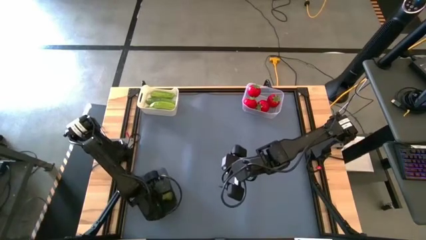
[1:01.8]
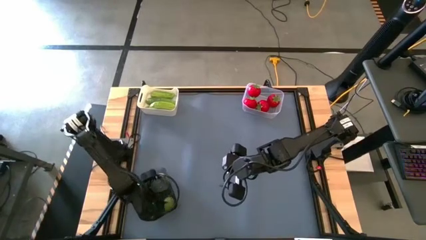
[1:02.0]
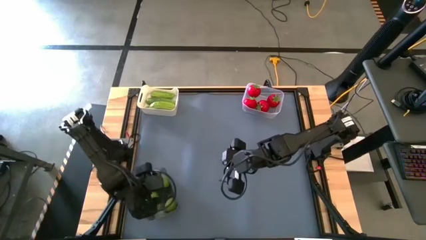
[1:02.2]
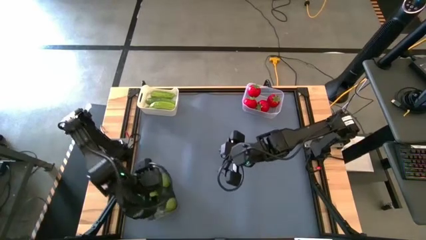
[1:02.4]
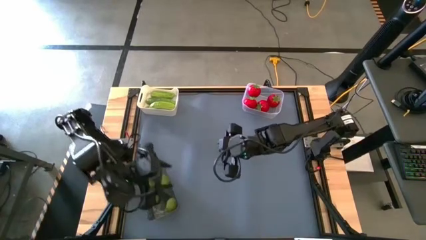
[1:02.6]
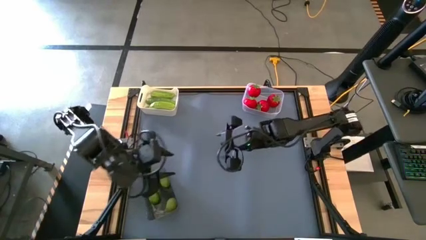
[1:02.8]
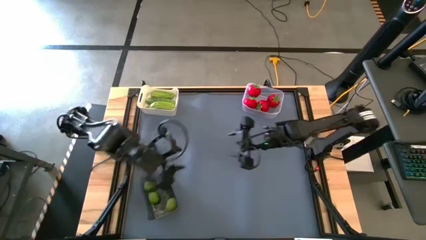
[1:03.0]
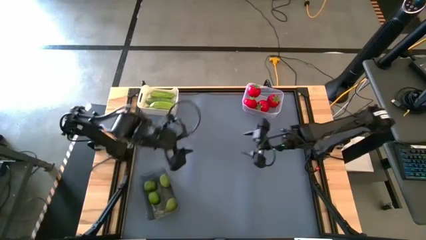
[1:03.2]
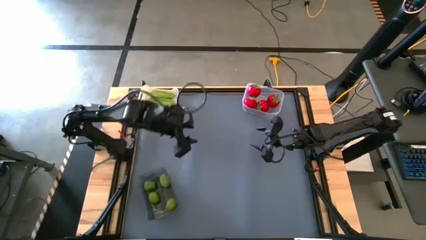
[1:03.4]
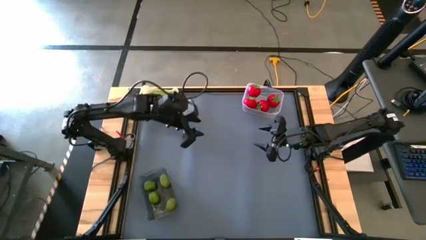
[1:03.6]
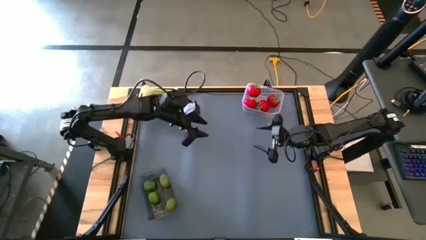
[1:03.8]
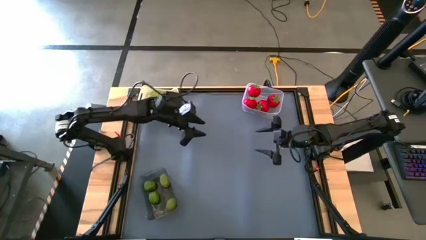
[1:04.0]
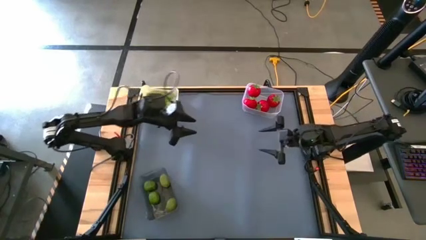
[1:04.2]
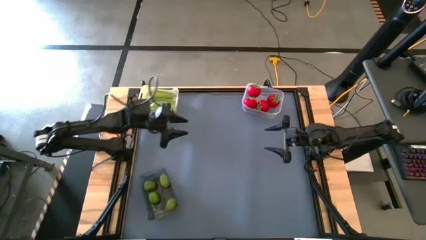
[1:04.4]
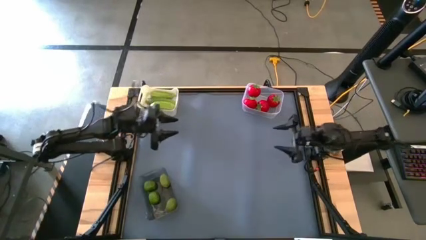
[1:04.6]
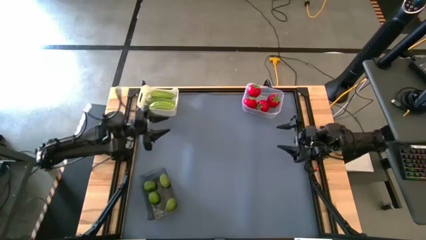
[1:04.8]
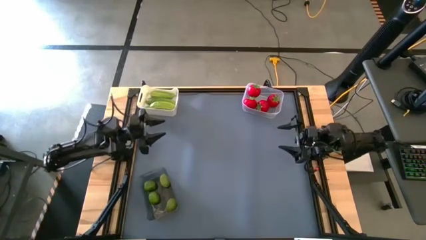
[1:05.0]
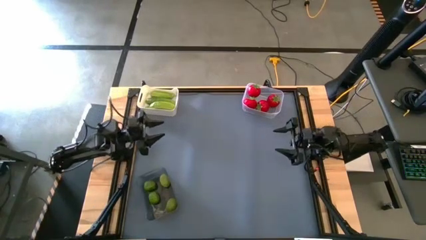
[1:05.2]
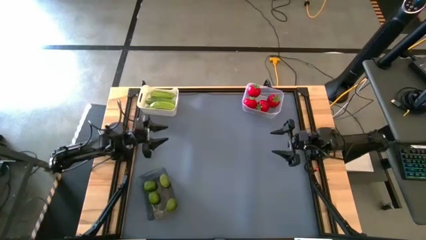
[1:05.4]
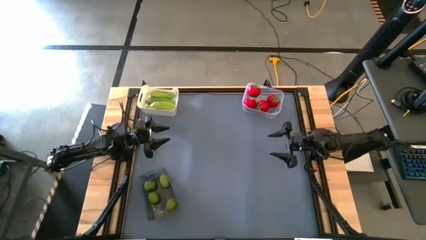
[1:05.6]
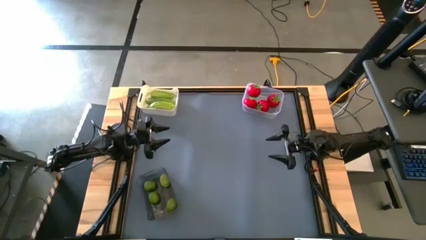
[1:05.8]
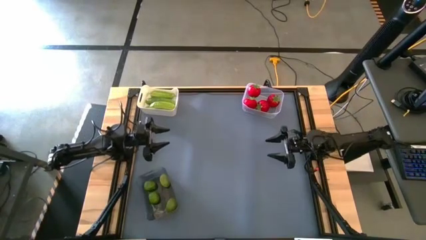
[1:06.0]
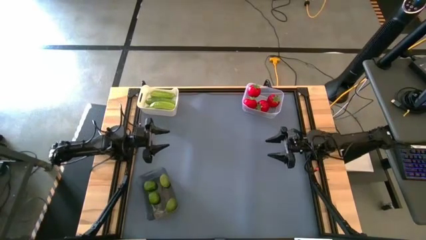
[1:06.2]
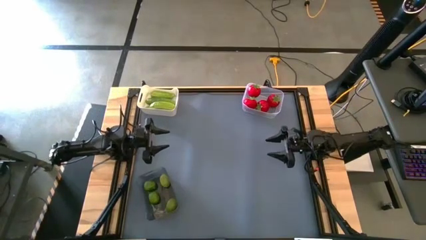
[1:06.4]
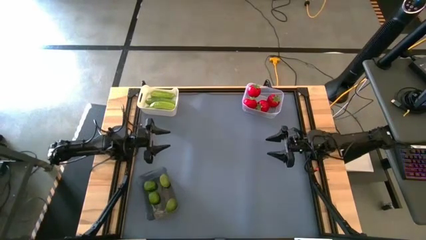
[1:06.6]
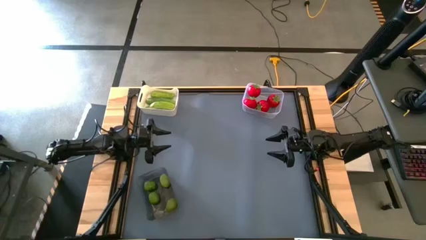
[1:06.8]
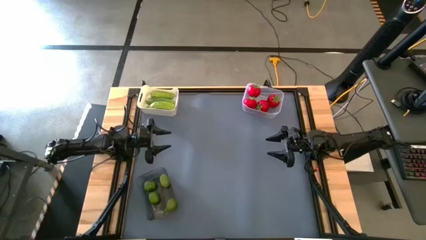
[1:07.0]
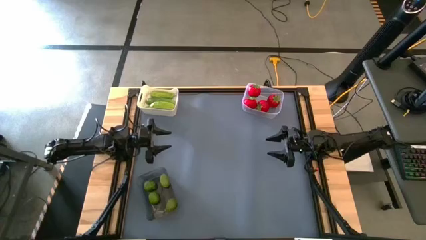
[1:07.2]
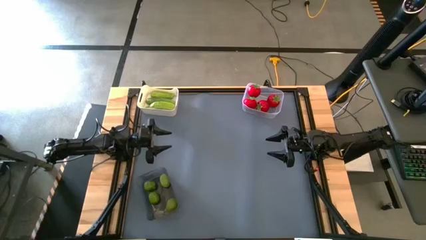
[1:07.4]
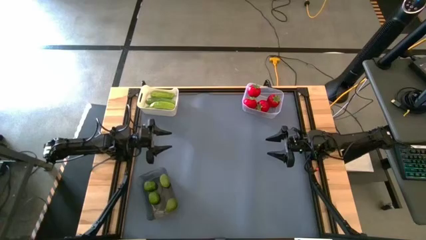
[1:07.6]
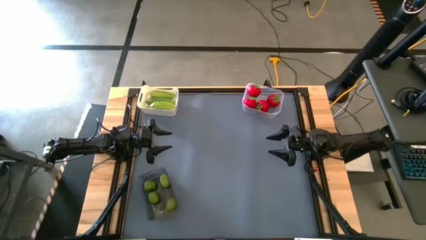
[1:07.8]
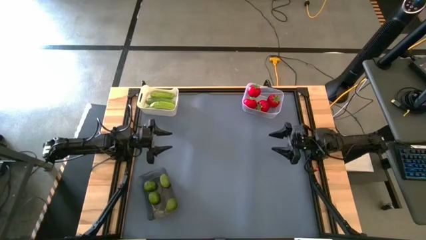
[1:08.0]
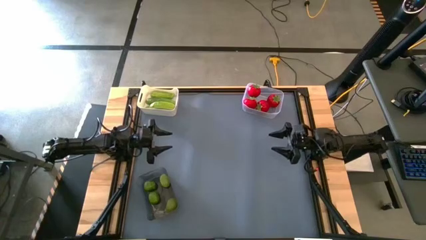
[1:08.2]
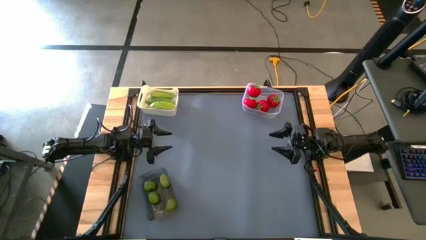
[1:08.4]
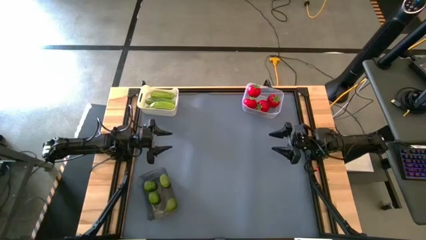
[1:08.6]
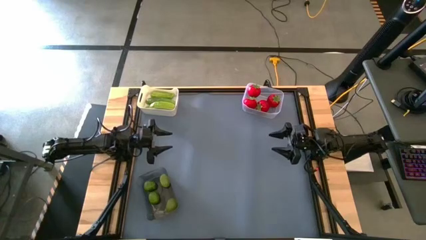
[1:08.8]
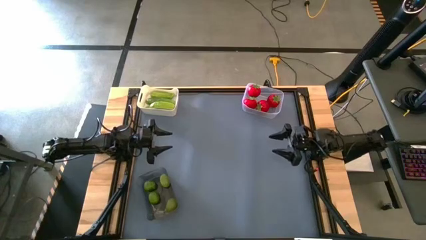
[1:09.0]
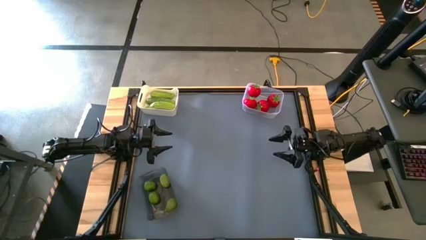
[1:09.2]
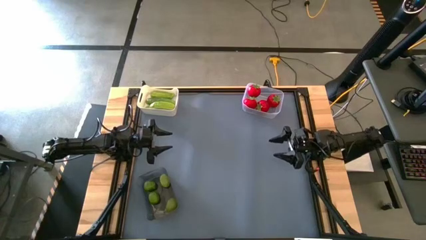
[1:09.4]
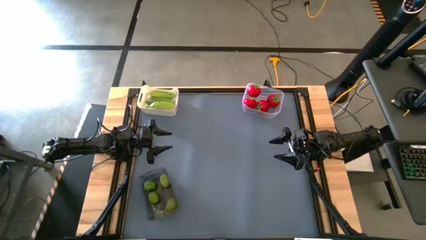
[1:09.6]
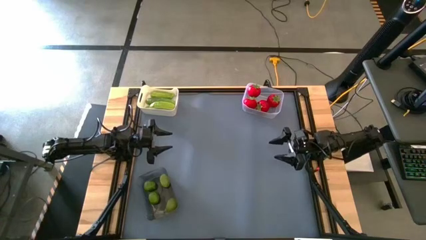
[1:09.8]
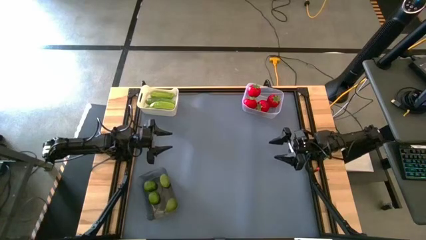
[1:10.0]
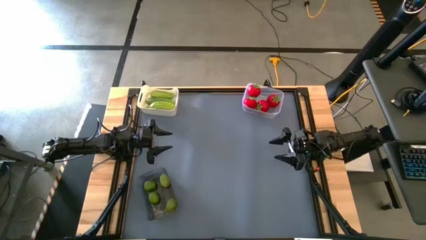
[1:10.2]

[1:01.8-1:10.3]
Task: Sort produce into baskets
Return to Home Position

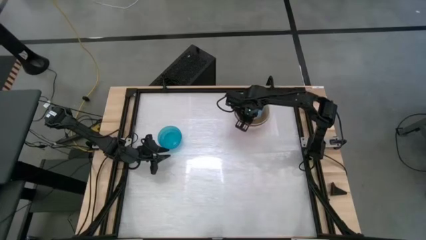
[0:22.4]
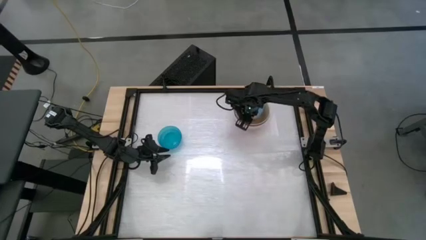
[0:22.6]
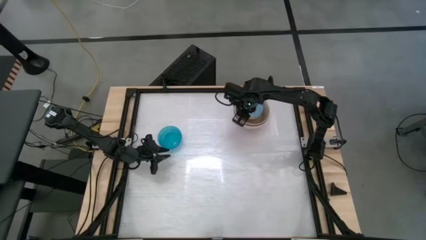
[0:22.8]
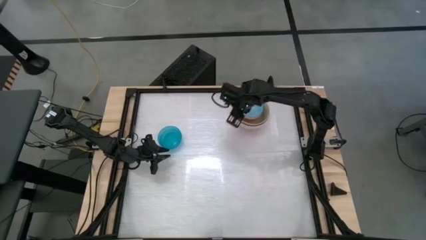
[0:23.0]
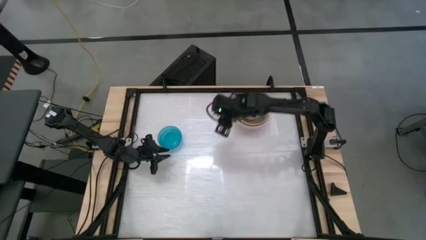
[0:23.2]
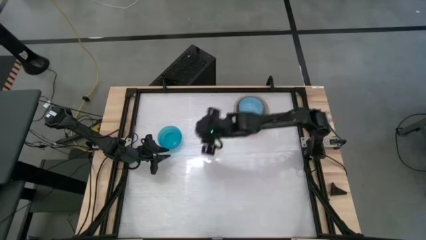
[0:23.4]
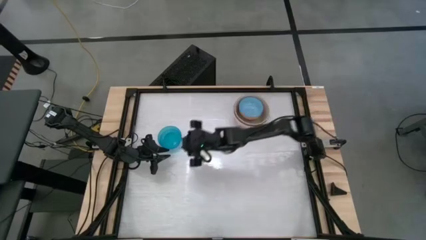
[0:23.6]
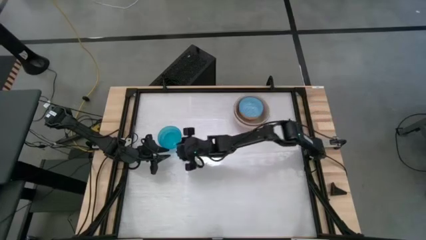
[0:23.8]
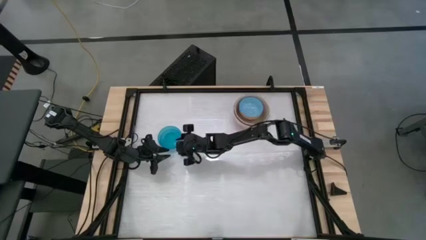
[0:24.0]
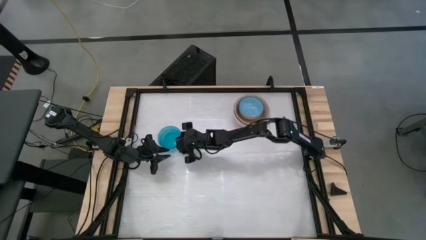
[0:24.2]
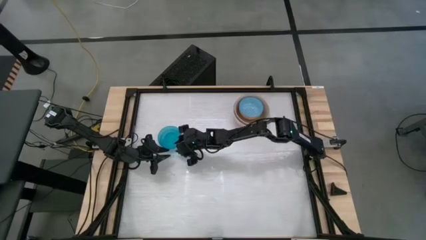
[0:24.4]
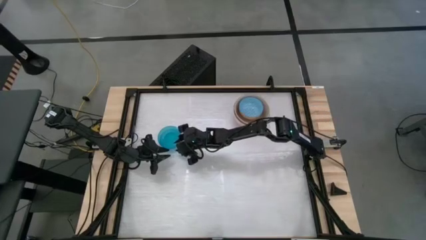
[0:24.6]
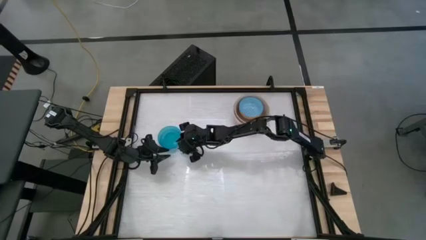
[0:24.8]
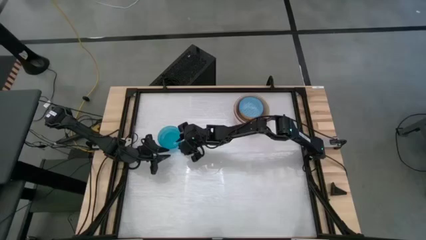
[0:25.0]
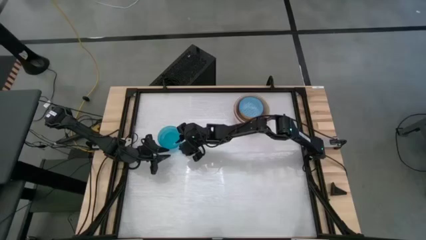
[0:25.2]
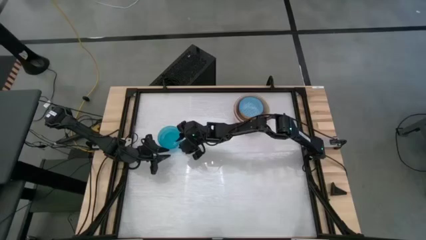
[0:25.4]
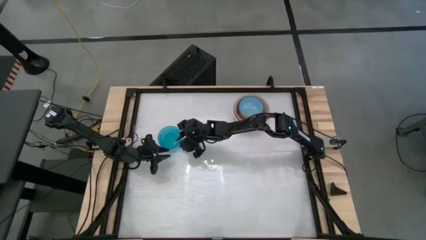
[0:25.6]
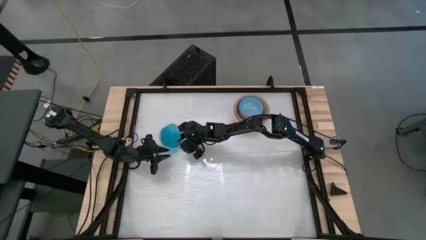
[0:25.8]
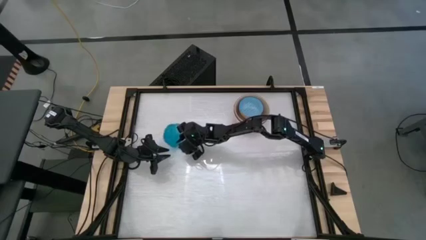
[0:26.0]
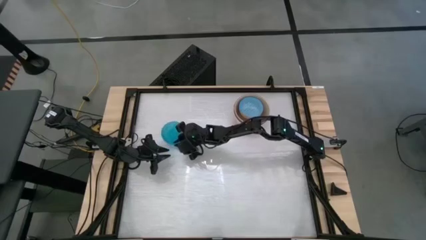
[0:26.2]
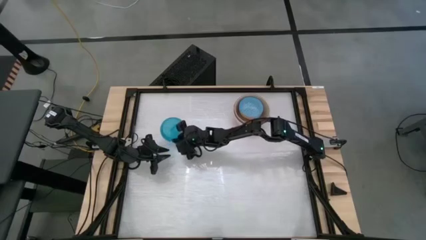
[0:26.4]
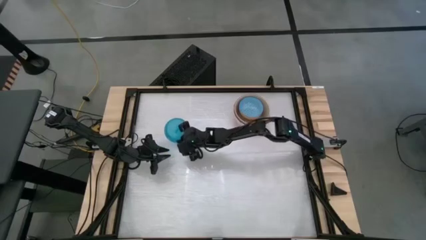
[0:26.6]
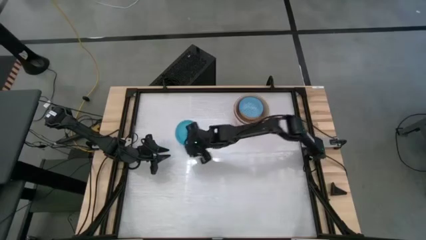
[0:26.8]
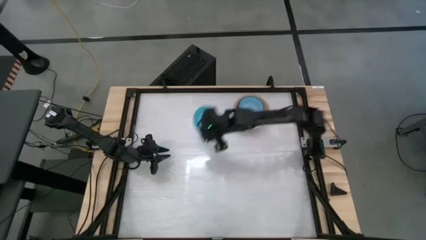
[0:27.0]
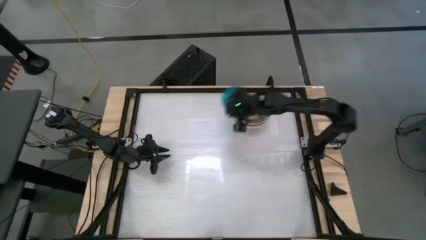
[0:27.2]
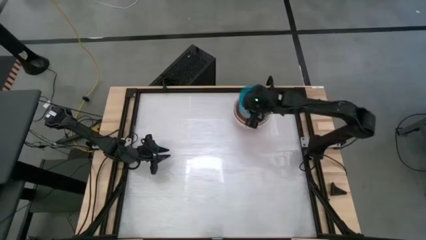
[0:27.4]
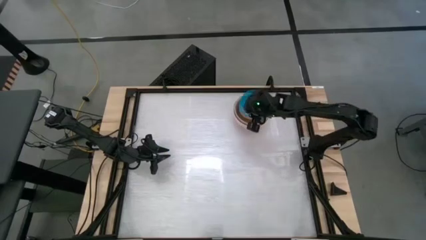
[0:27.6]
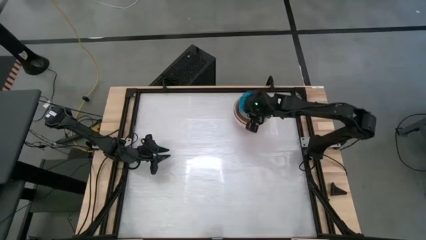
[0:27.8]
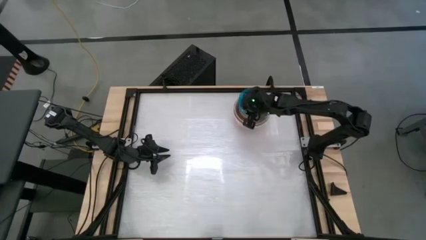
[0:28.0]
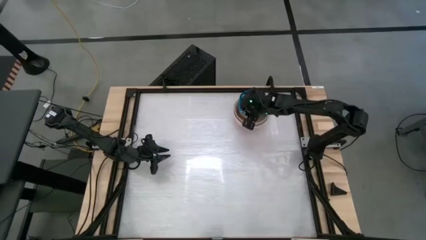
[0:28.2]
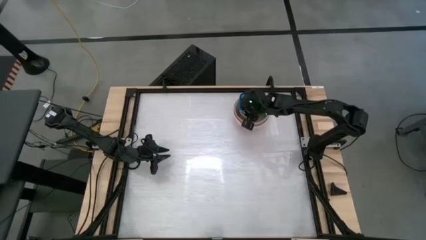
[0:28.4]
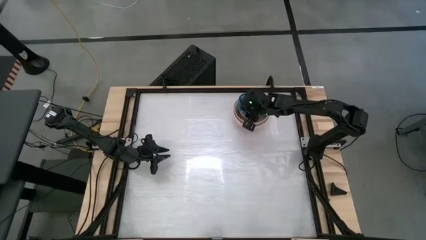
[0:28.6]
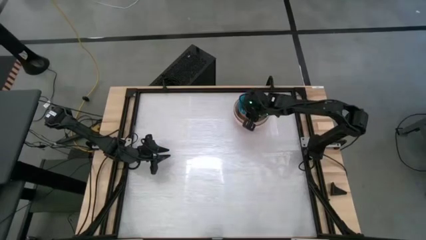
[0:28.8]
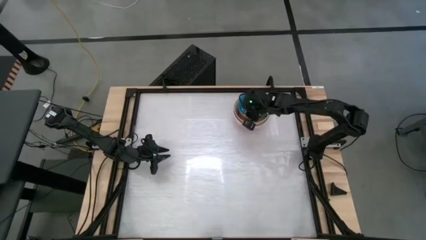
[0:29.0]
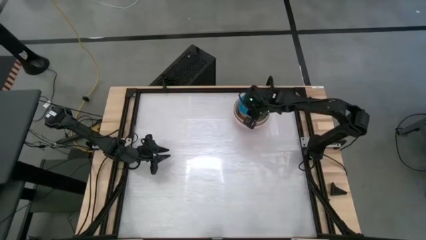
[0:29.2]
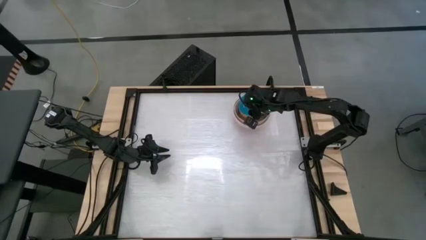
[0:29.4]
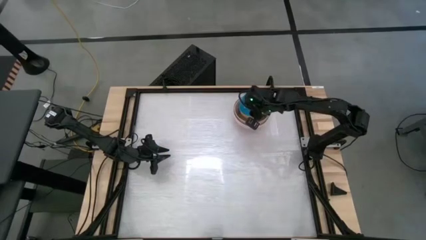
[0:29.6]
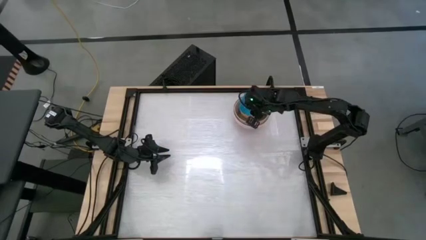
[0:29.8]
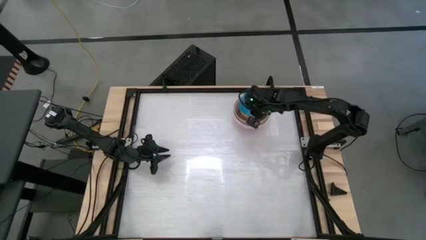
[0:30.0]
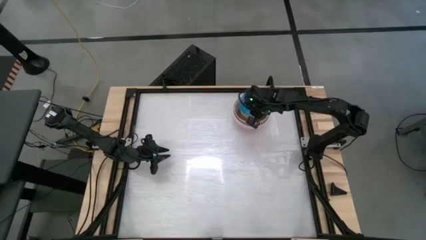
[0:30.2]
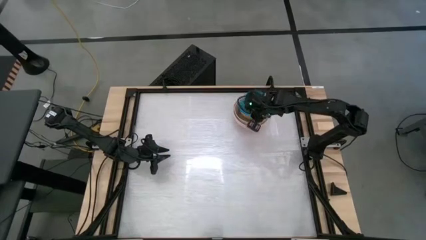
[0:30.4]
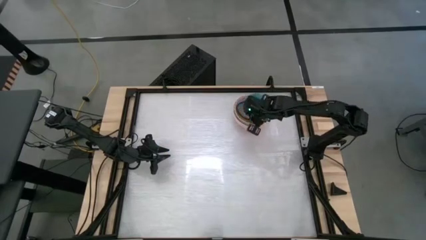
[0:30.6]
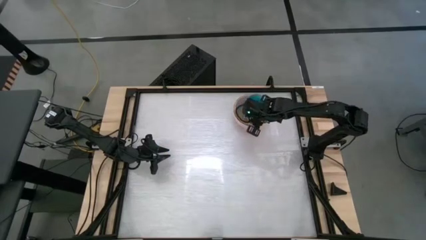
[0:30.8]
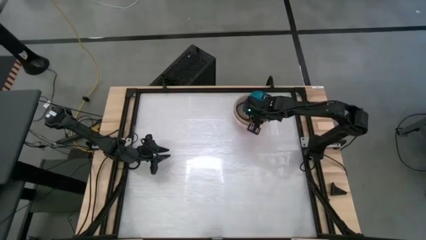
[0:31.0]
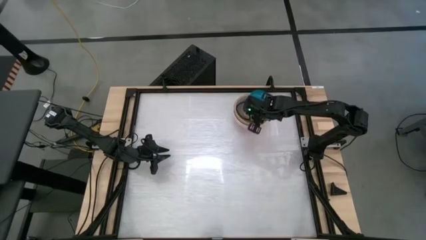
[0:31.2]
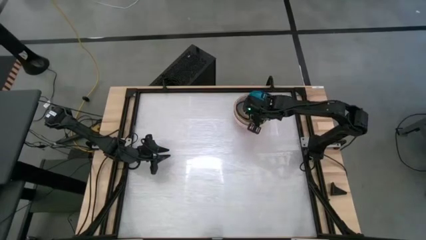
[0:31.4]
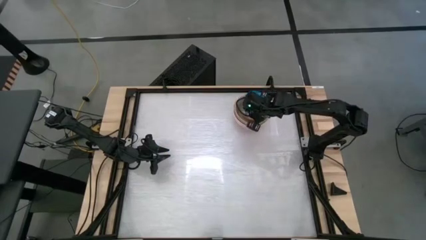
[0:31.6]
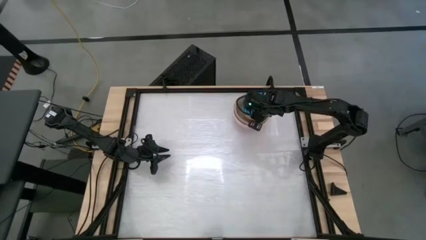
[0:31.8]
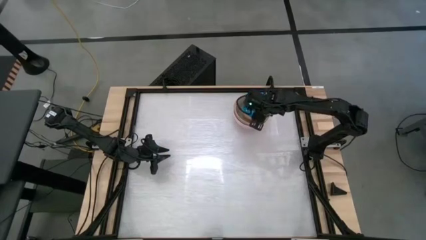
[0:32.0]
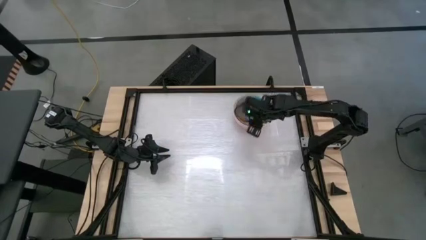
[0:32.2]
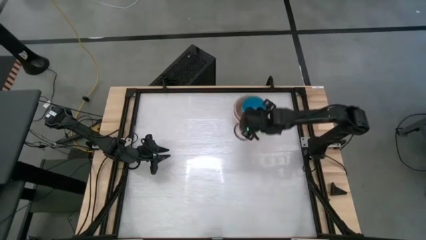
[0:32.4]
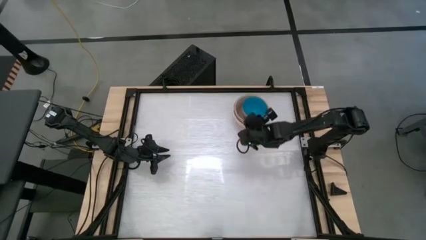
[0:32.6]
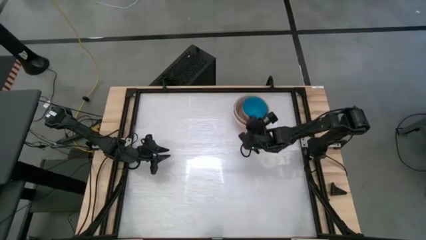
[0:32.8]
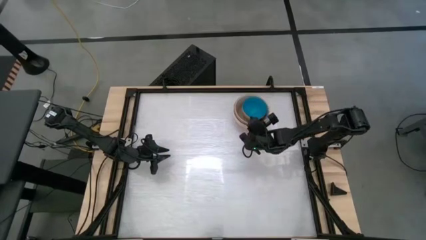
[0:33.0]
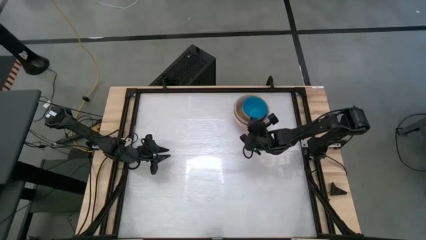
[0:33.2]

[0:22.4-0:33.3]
Task: Nest bowls inside each other by size order
Stack the light blue bowl on top of the blue bowl
